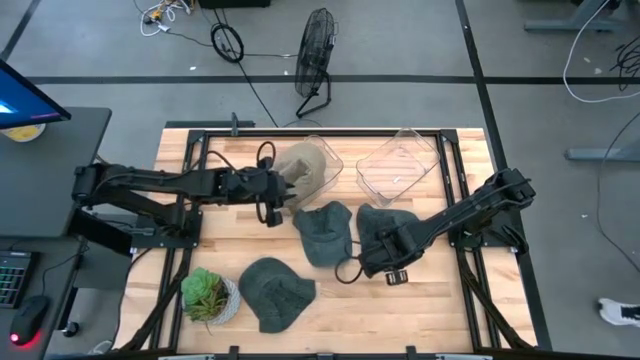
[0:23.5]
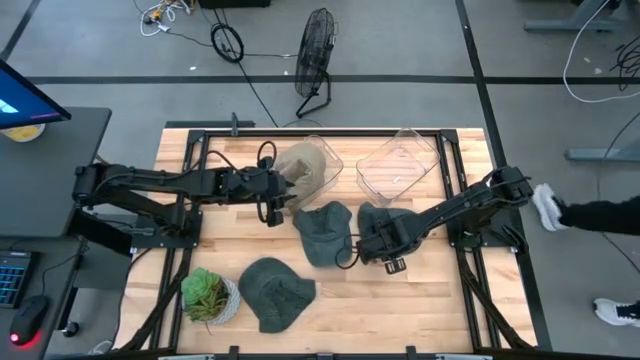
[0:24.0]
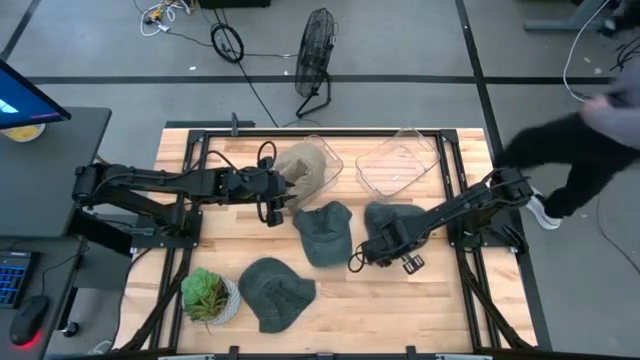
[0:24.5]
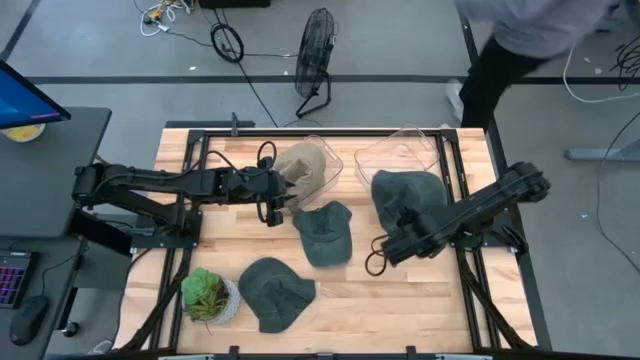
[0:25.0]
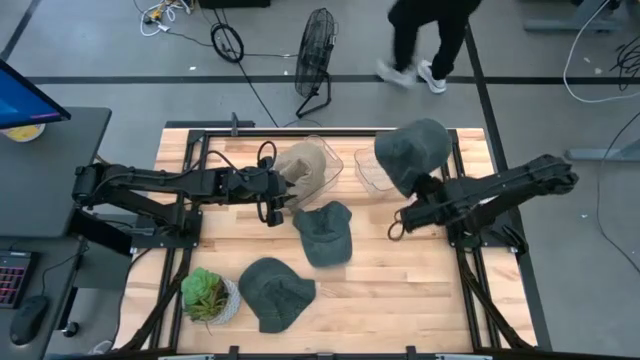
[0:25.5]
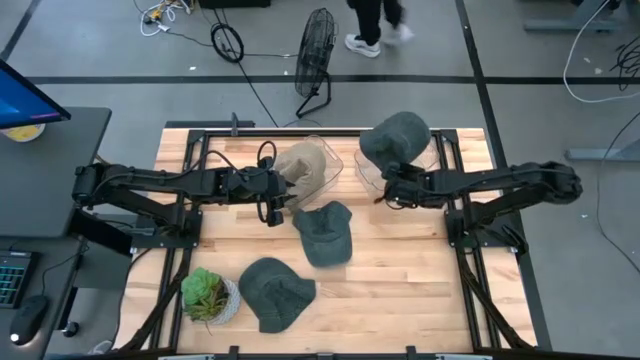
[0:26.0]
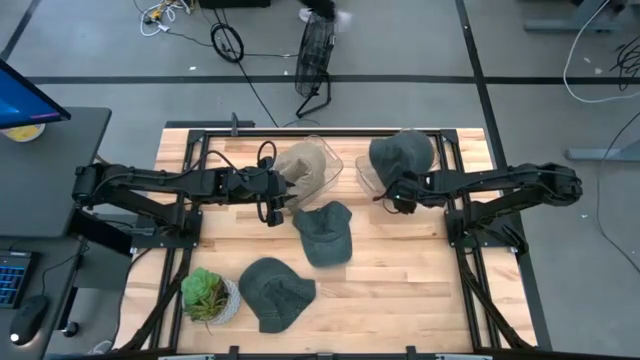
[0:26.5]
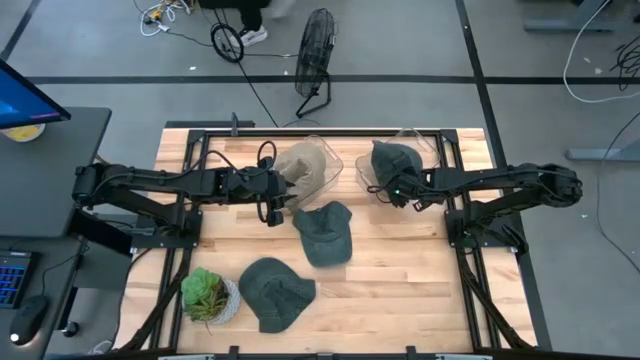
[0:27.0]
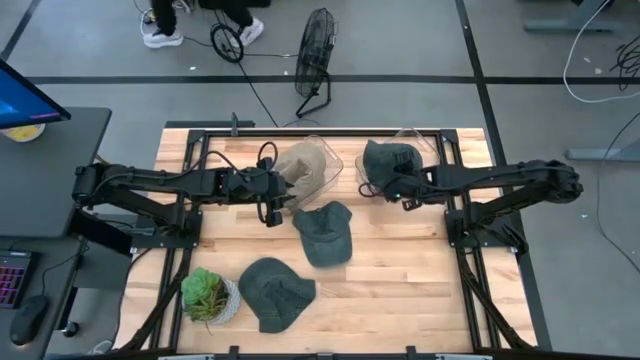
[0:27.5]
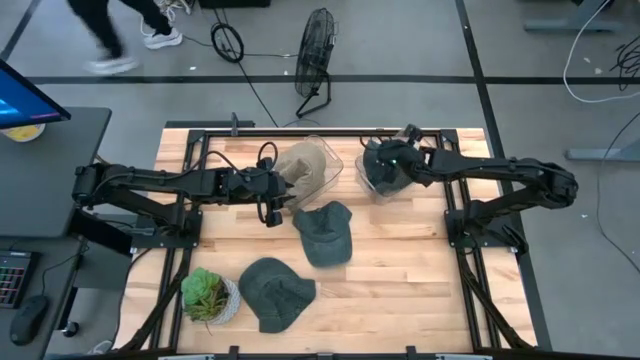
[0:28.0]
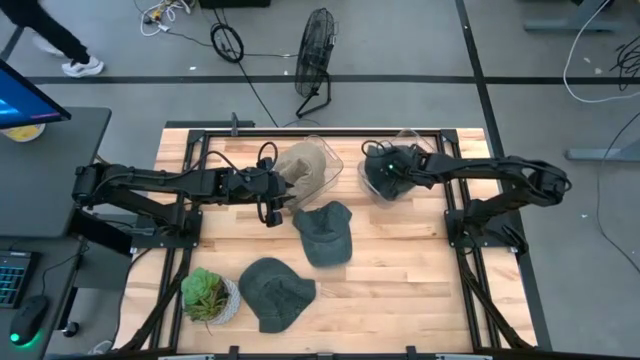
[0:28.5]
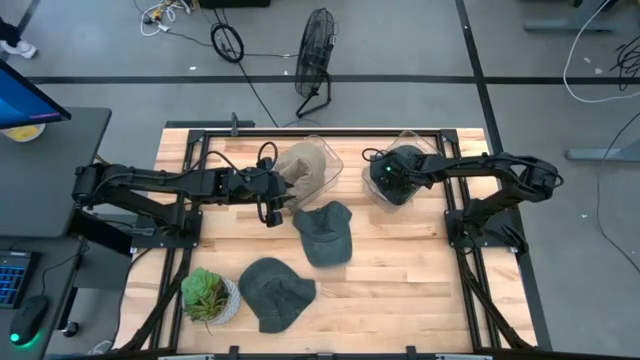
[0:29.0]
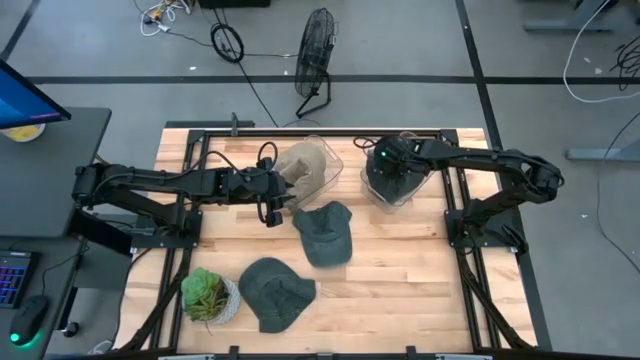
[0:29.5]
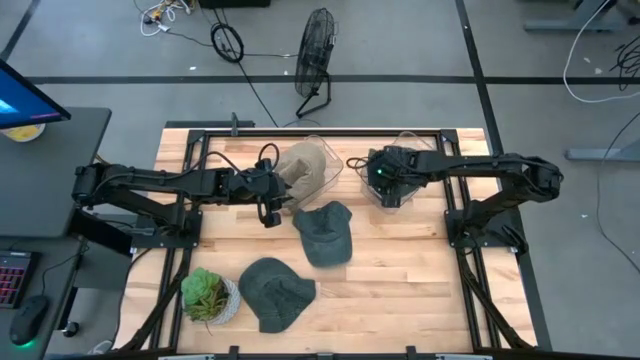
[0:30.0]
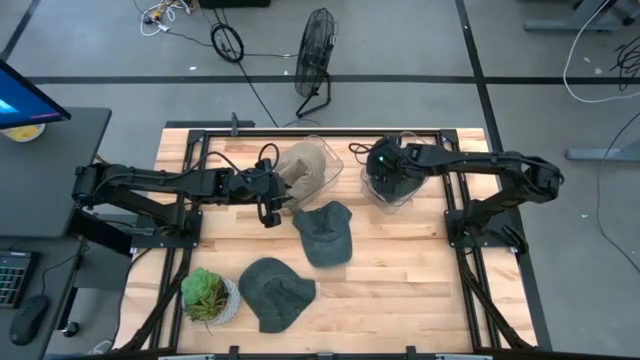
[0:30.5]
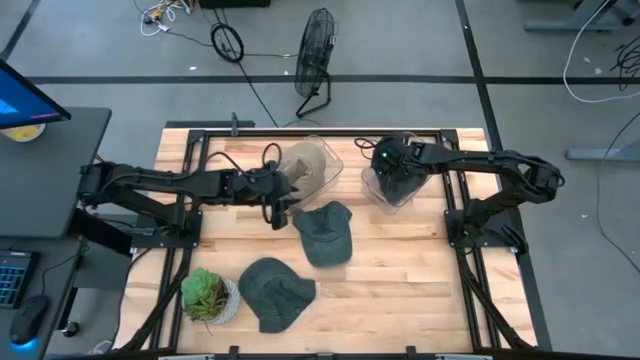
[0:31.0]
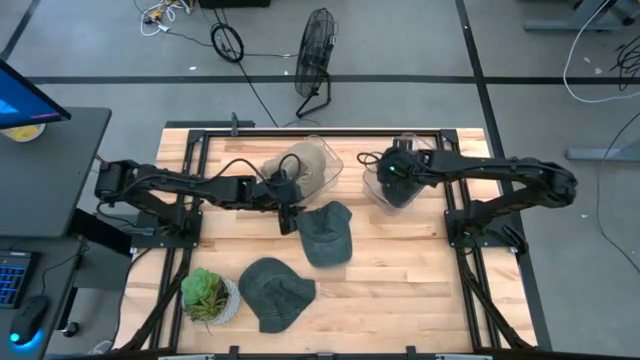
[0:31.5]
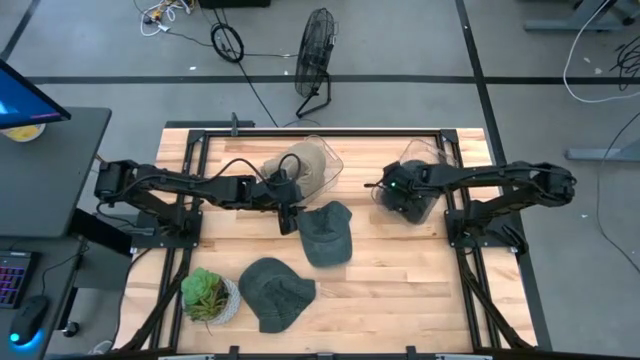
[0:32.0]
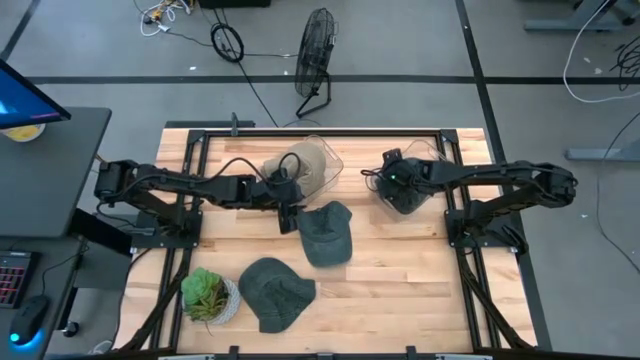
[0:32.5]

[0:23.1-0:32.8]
Task: Pick & Place hat
Put the top right black cap into the right transparent bin

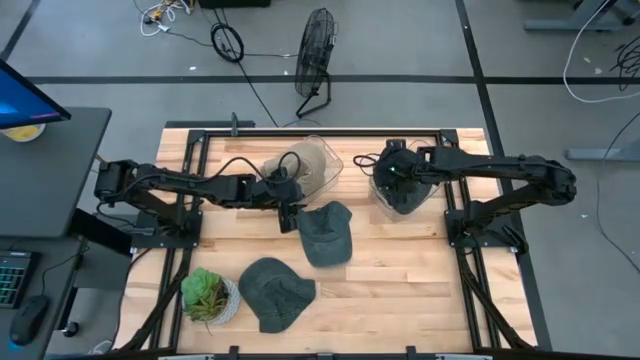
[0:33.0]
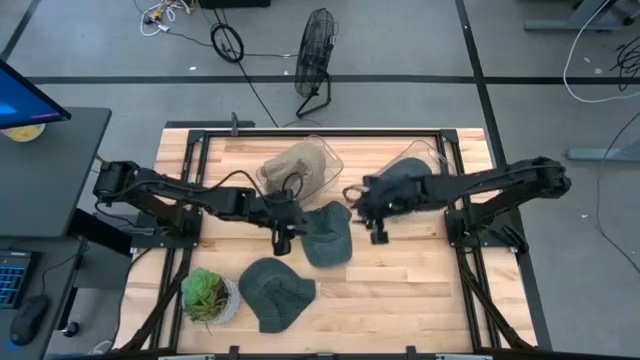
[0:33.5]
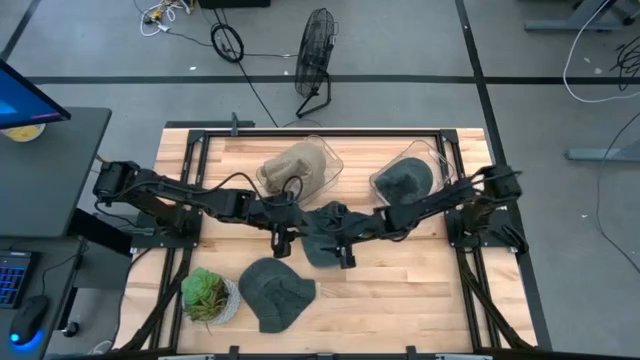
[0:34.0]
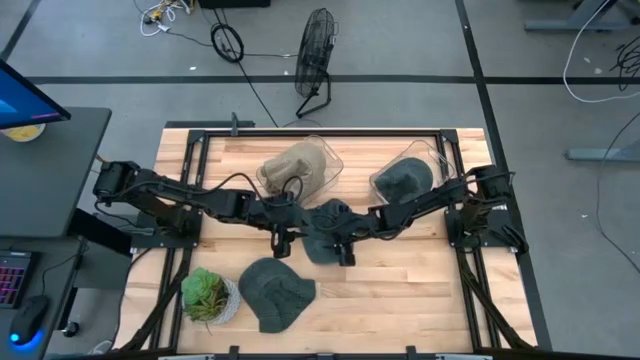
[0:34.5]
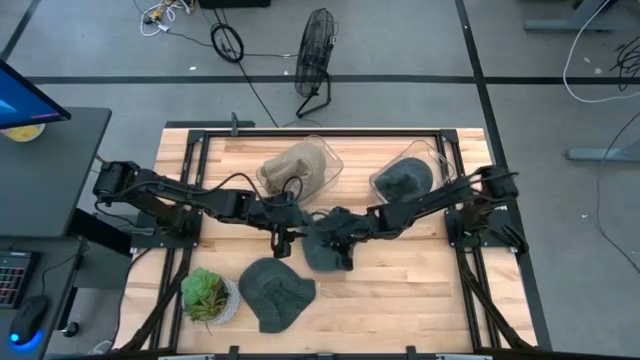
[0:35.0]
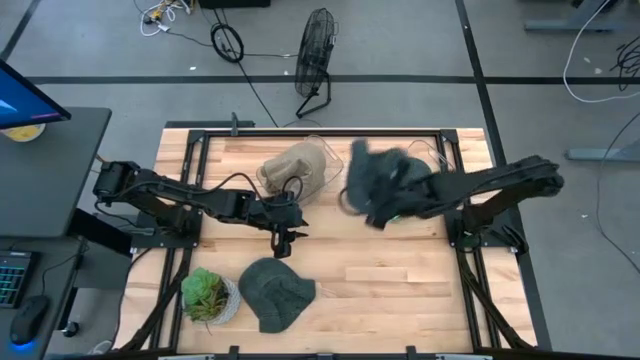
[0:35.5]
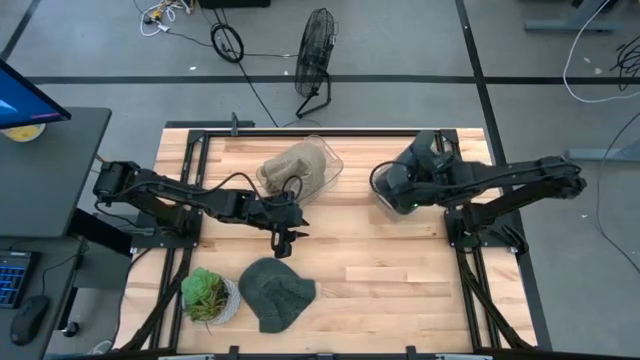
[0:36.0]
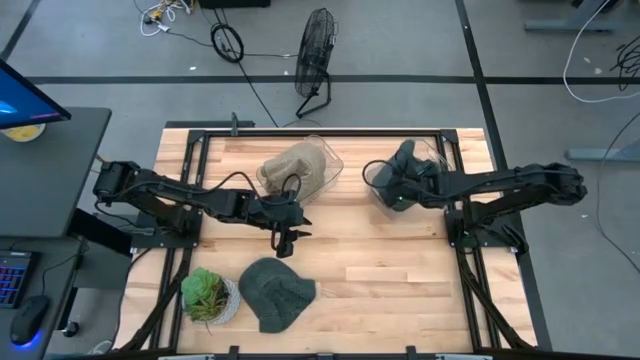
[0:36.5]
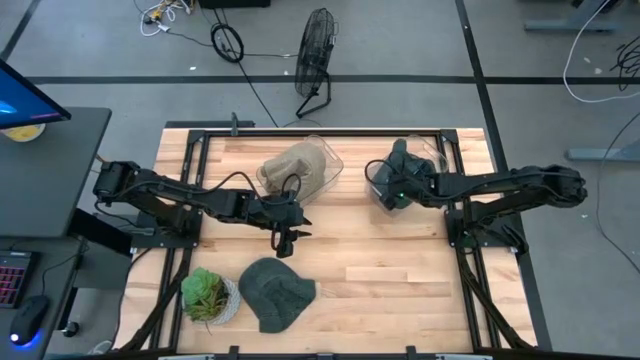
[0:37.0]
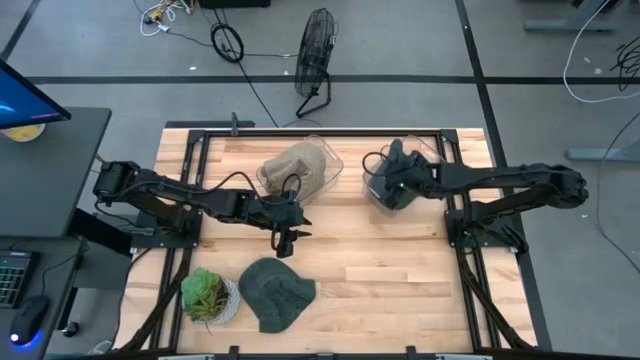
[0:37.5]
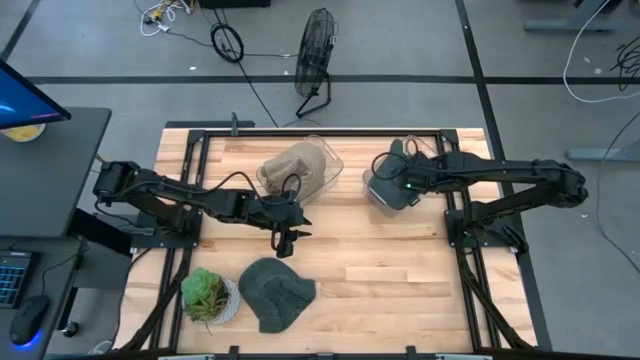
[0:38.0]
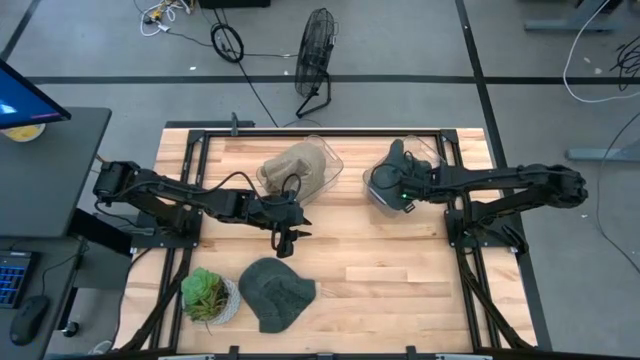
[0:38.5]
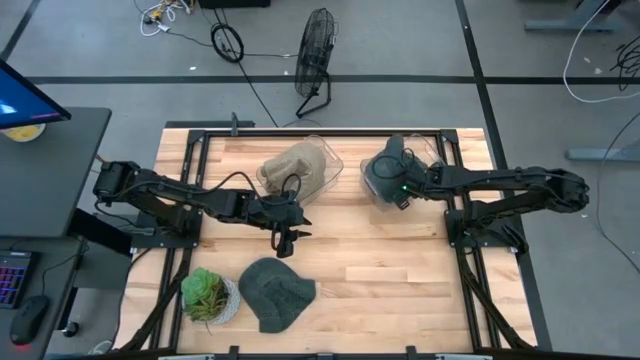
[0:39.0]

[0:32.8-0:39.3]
Put the top black cap into the right transparent bin

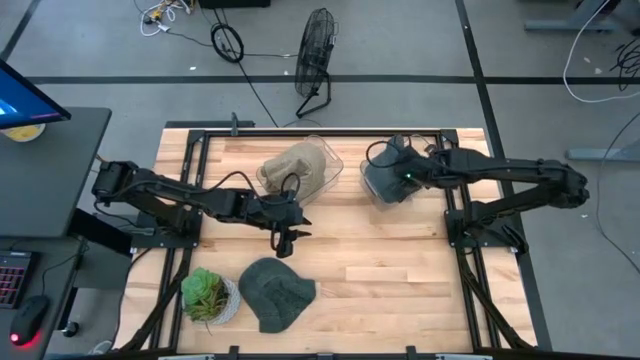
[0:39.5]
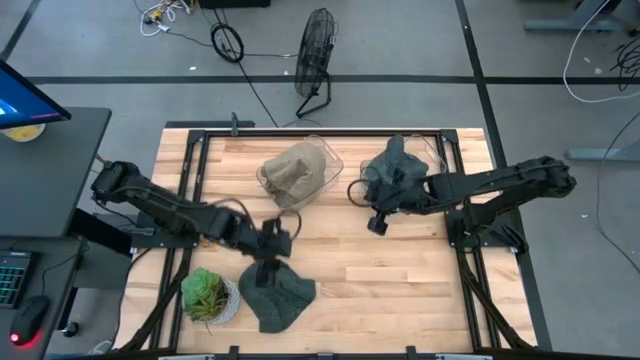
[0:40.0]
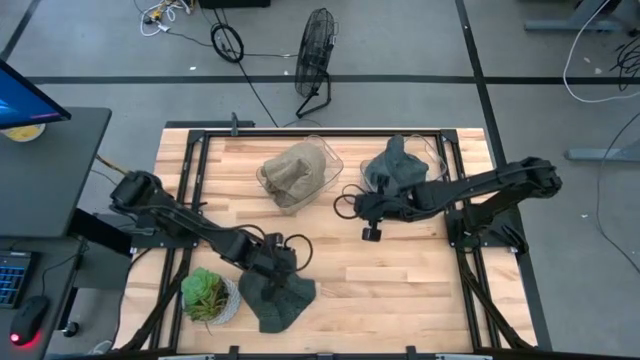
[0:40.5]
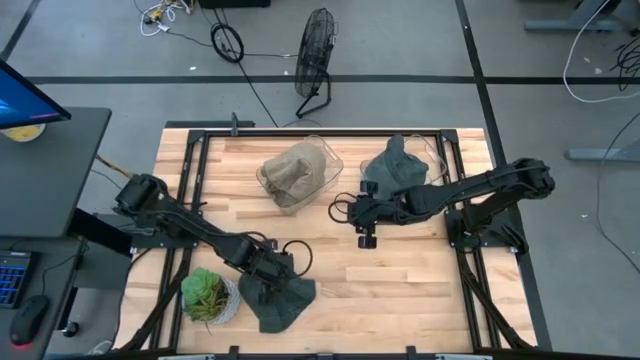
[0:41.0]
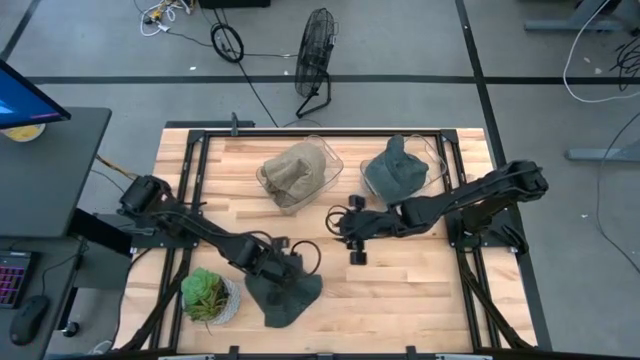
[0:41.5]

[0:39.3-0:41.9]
Put the black cap into the right transparent bin

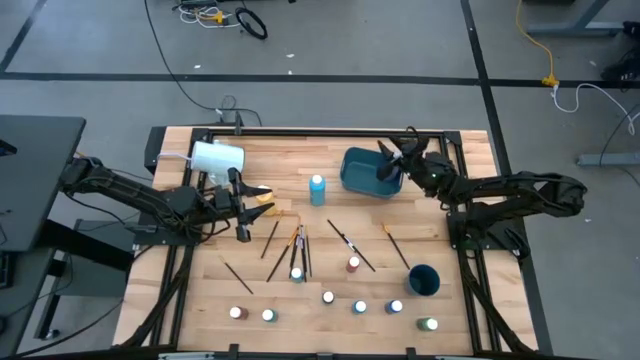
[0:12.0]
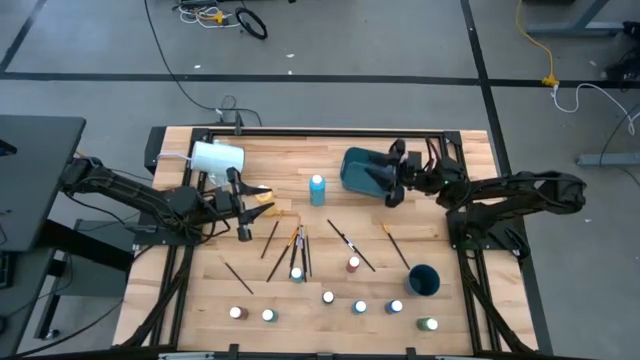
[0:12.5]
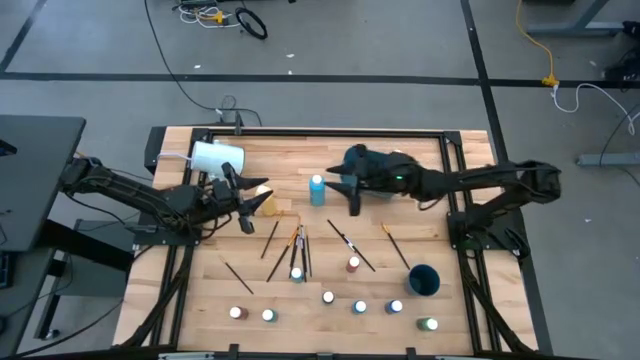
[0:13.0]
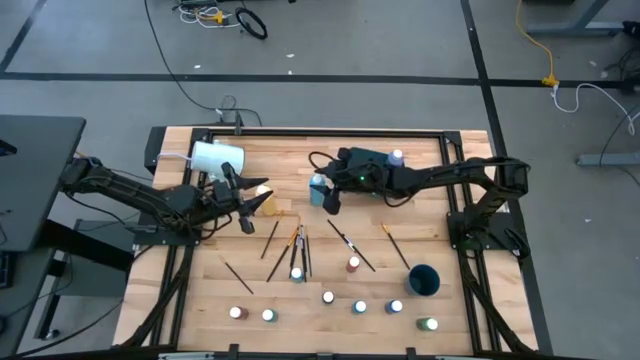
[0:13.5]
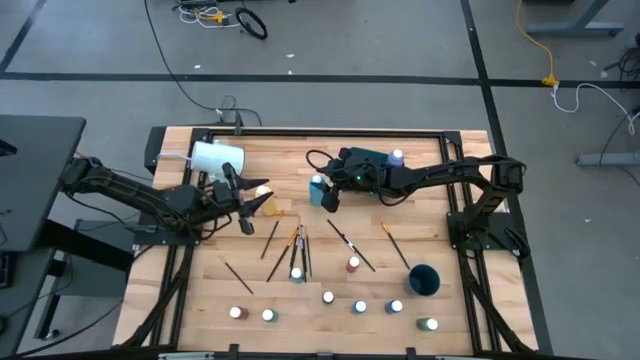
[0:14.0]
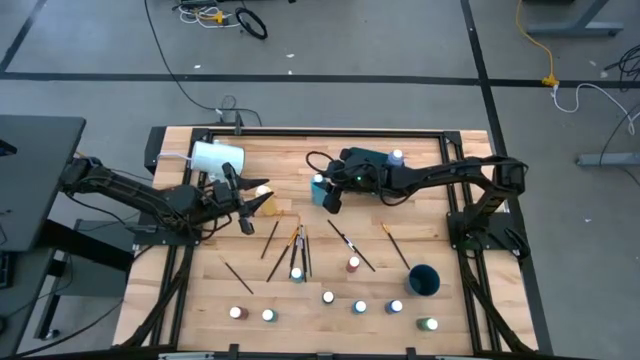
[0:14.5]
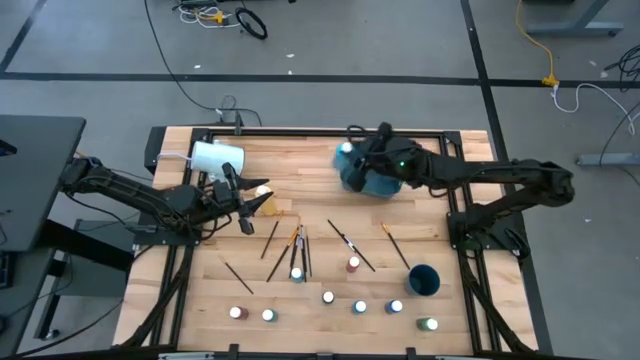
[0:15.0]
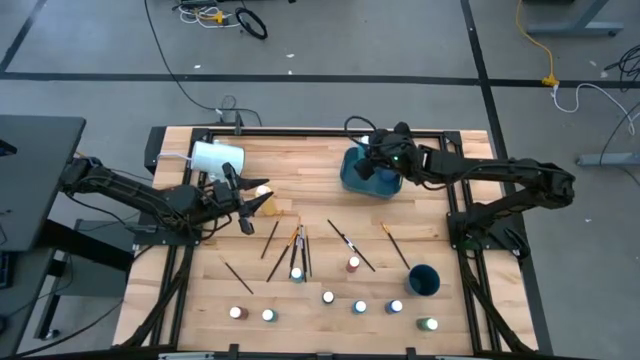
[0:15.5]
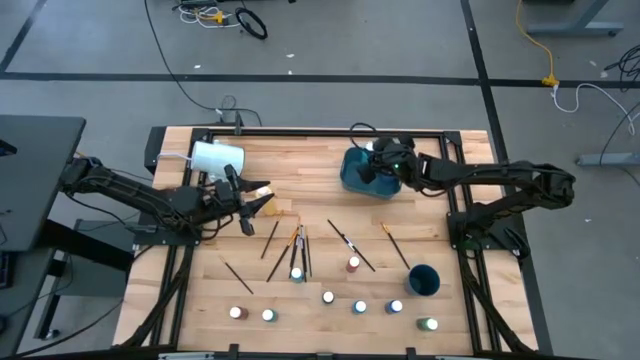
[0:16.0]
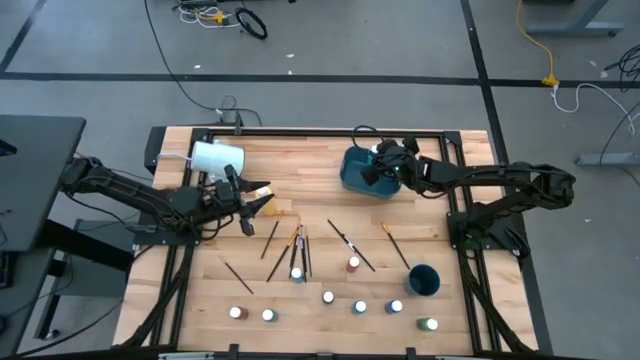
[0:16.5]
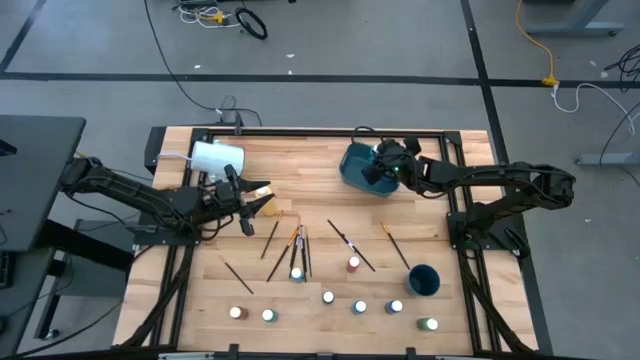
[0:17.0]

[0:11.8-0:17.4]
Task: Pick & Place Paint Supplies
Put the large light blue paint bottle into the bin
